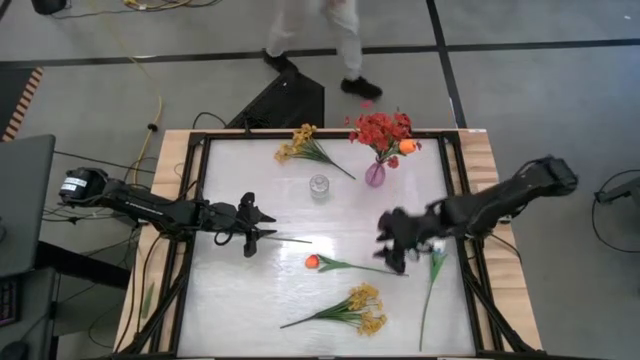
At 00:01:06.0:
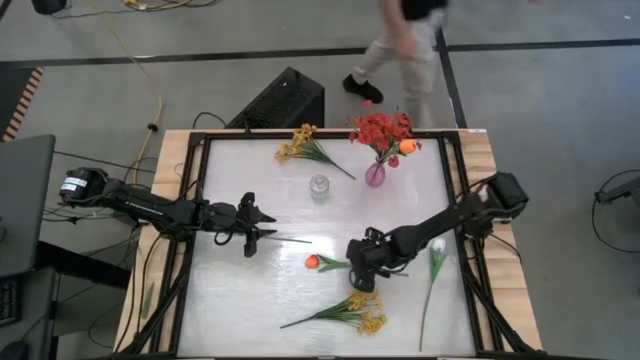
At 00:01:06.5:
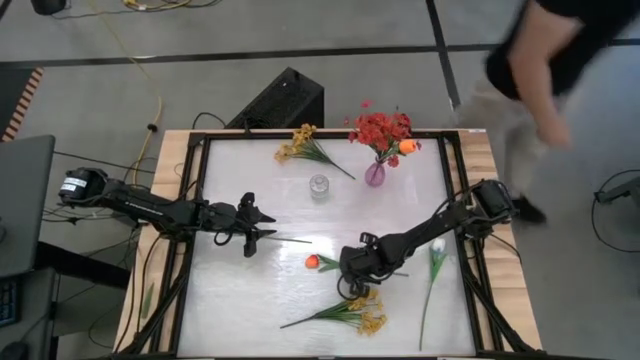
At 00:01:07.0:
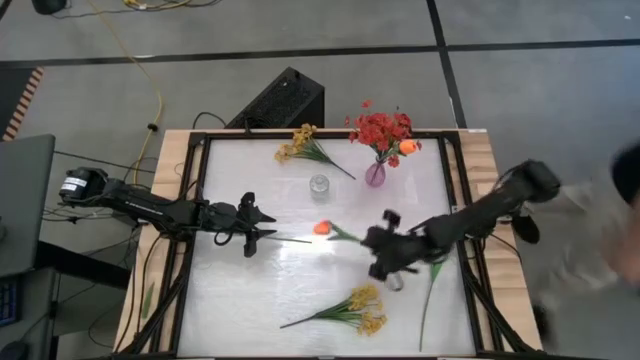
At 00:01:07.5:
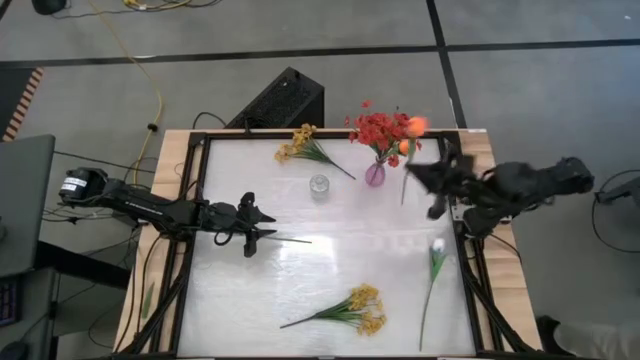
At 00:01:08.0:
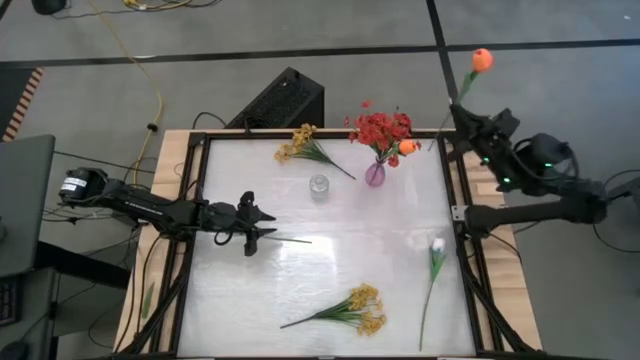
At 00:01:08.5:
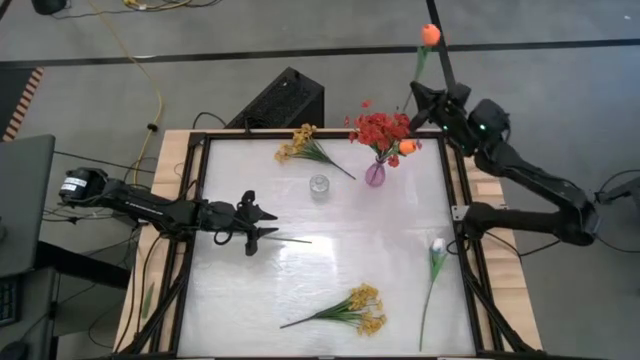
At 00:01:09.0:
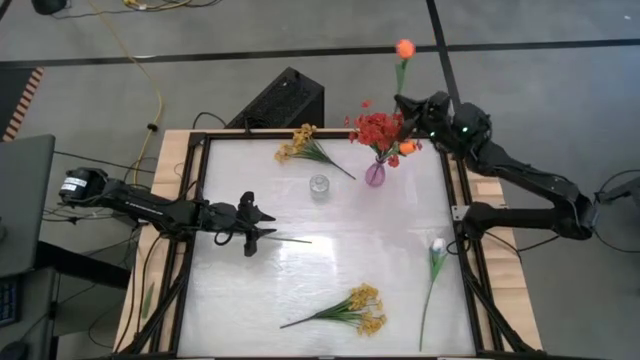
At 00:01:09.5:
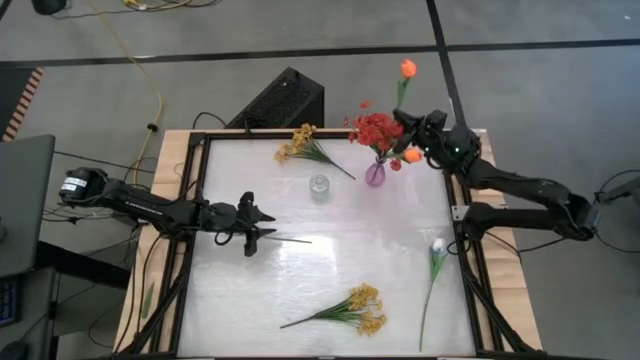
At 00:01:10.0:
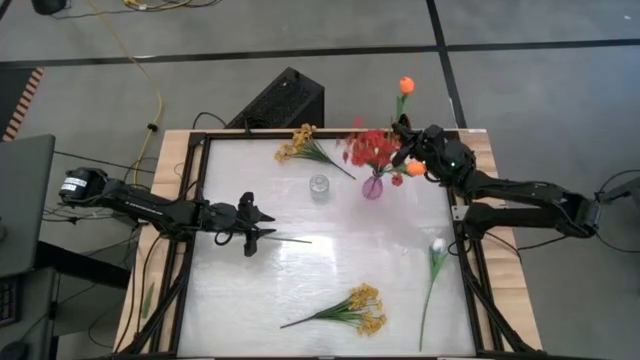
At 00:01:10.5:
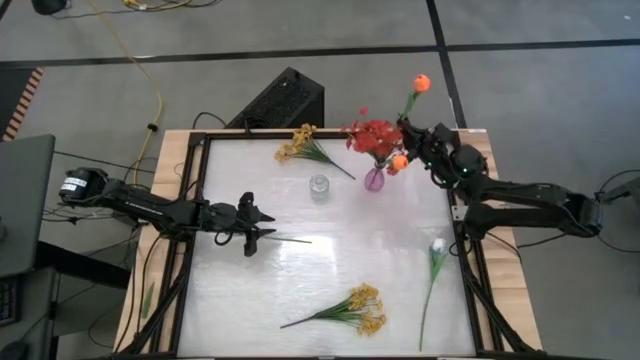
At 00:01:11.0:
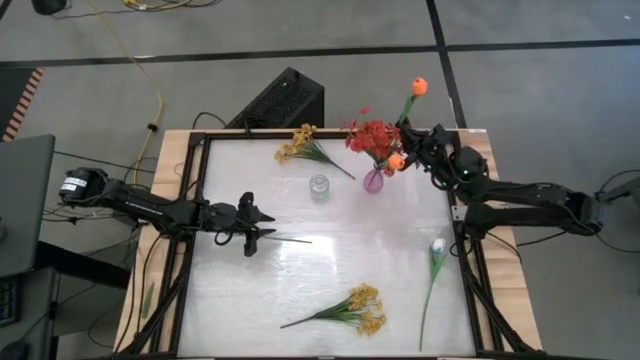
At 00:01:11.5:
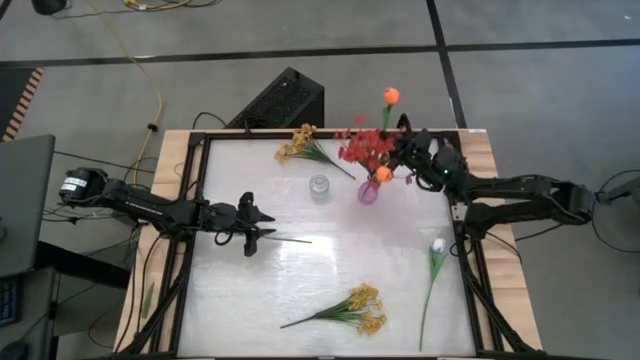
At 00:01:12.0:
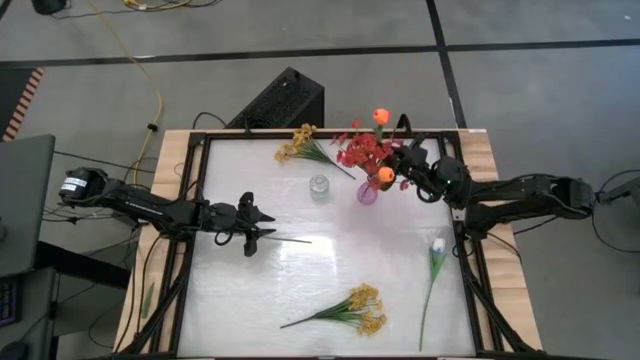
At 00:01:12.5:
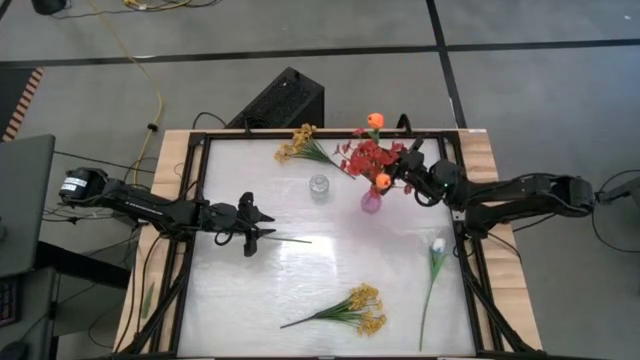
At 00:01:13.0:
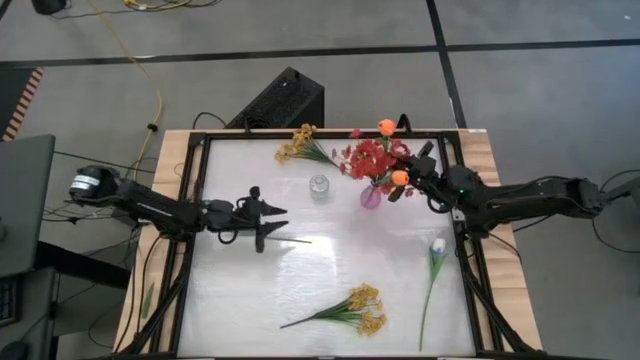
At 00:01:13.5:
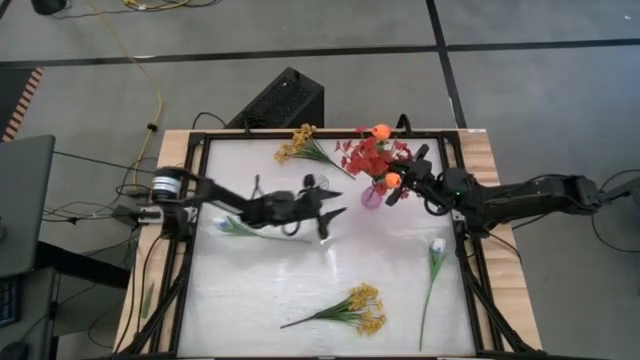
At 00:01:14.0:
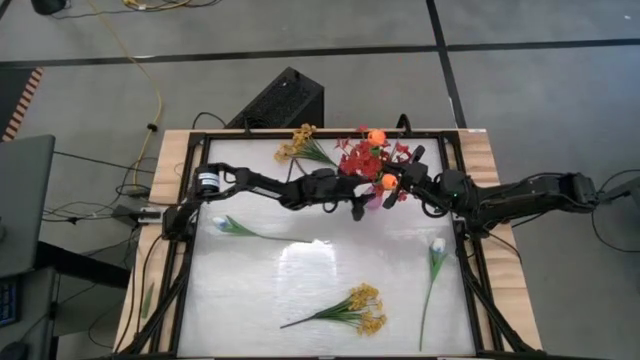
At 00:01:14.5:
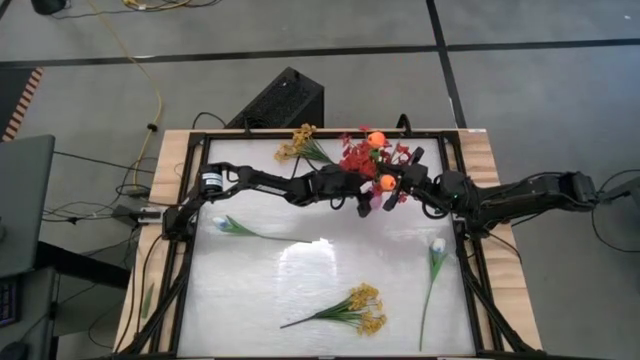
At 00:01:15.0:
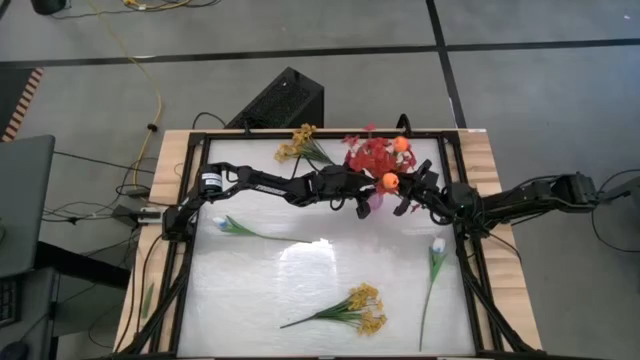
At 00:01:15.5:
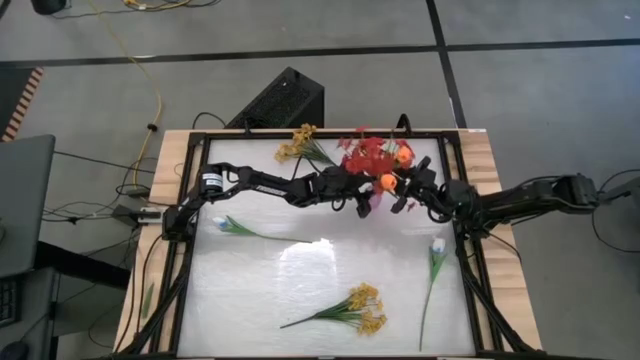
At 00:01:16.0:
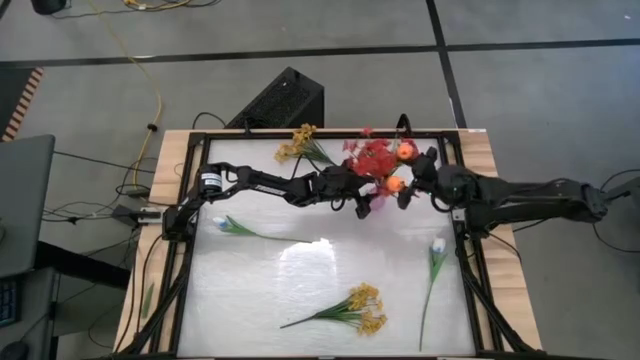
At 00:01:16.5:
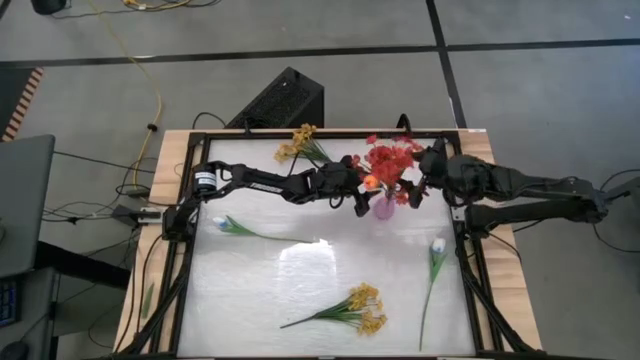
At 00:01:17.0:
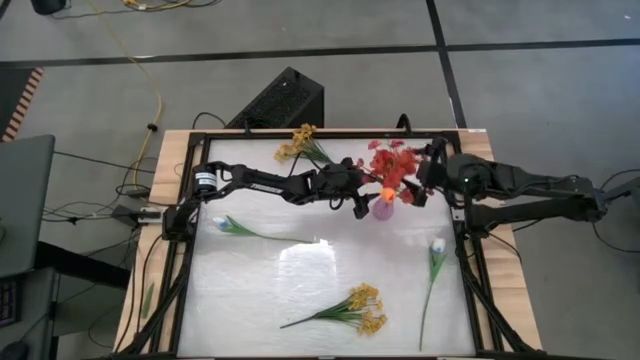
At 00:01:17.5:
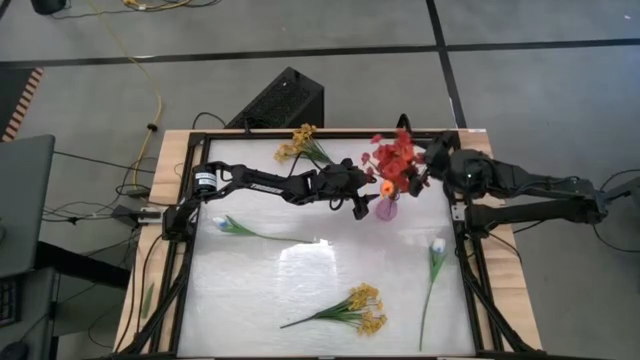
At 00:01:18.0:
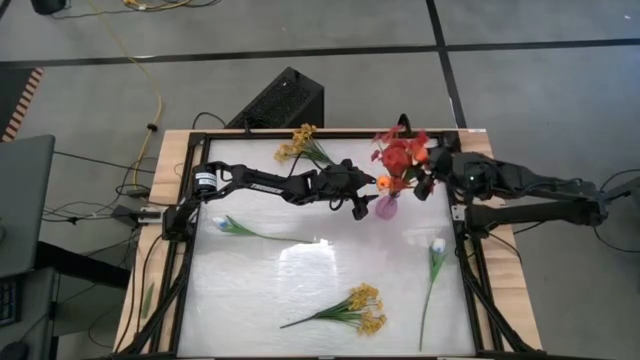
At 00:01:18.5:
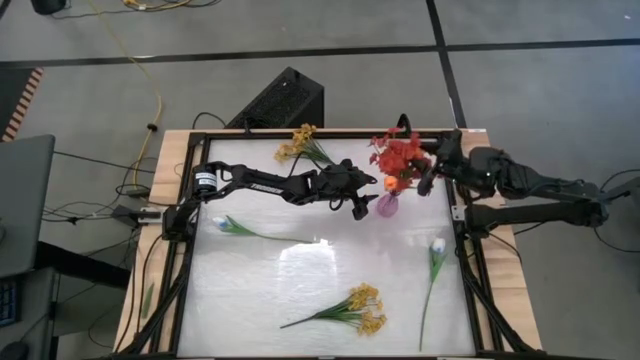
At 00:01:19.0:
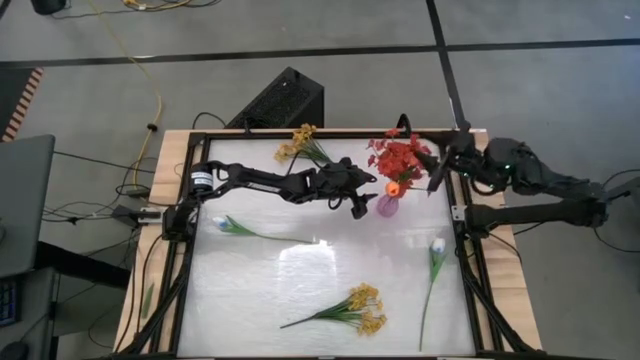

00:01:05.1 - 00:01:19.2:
Task: Sort flowers into vase by color
Put the orange flower into the pink flower vase

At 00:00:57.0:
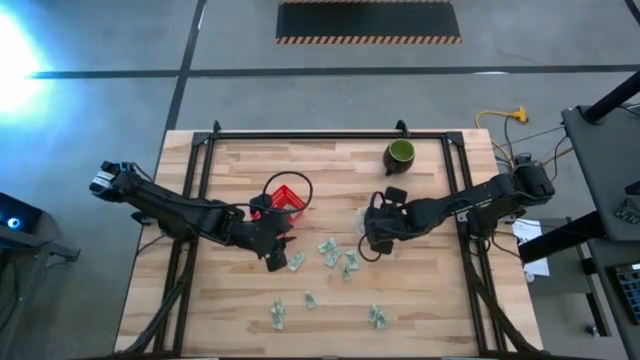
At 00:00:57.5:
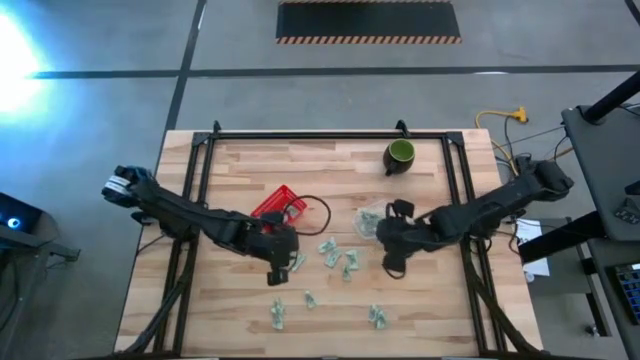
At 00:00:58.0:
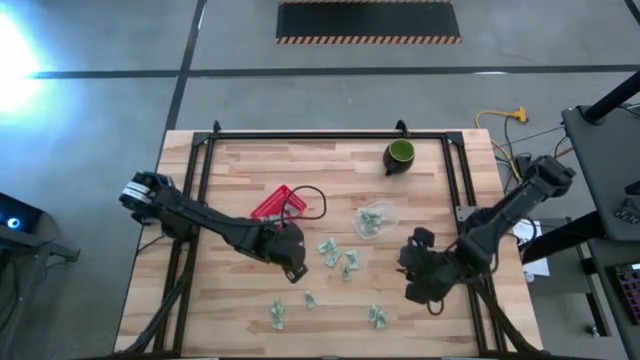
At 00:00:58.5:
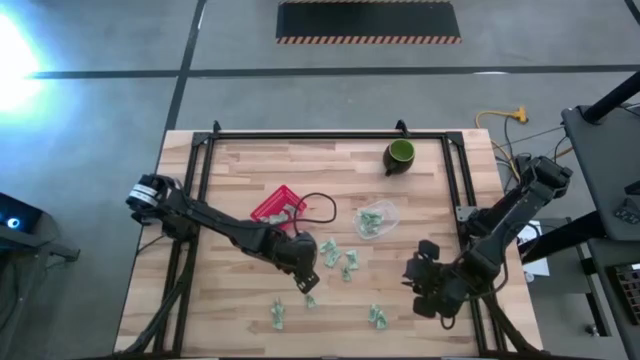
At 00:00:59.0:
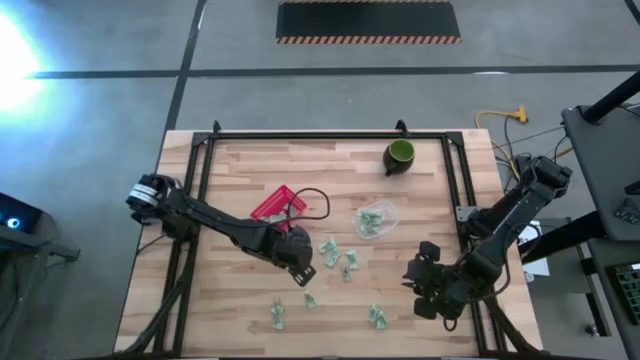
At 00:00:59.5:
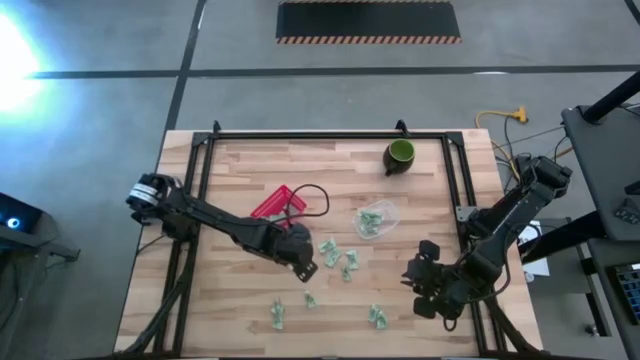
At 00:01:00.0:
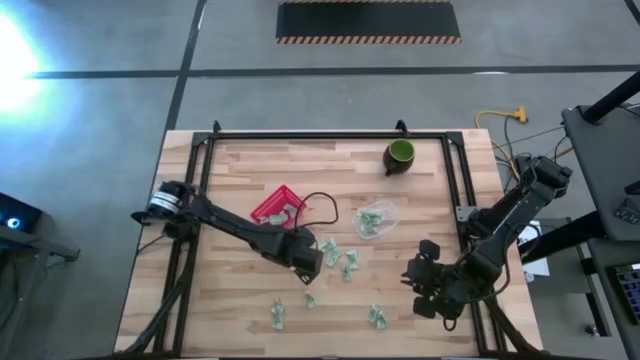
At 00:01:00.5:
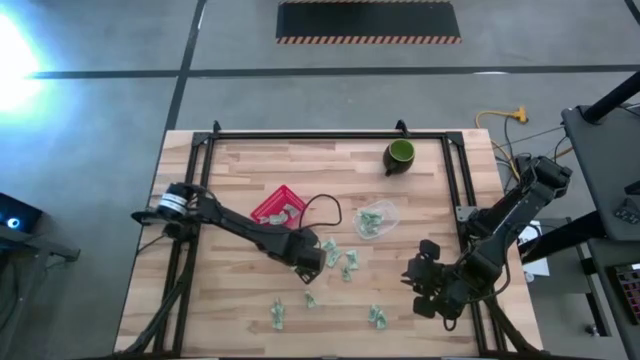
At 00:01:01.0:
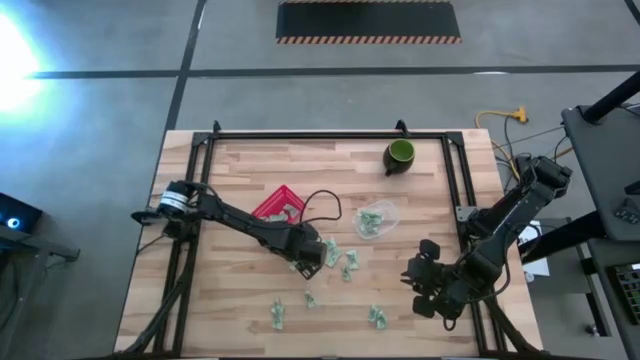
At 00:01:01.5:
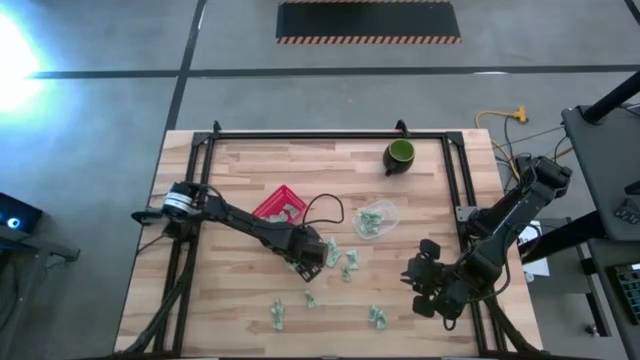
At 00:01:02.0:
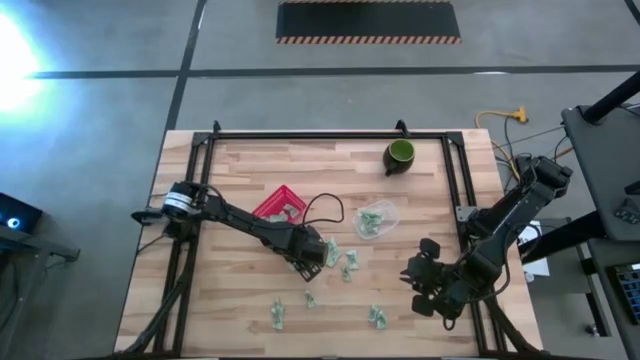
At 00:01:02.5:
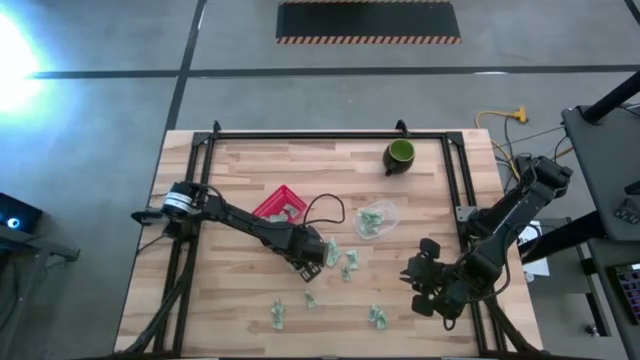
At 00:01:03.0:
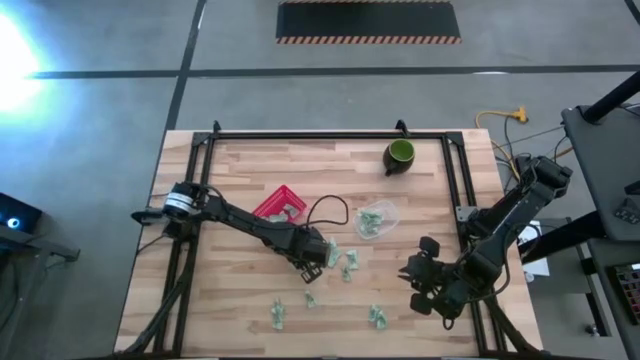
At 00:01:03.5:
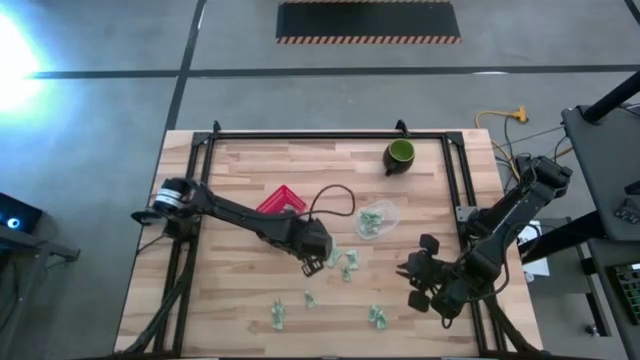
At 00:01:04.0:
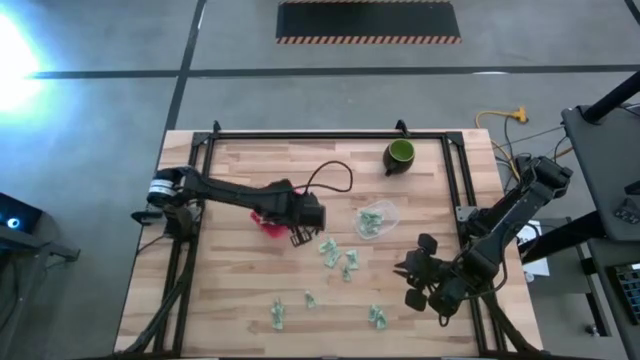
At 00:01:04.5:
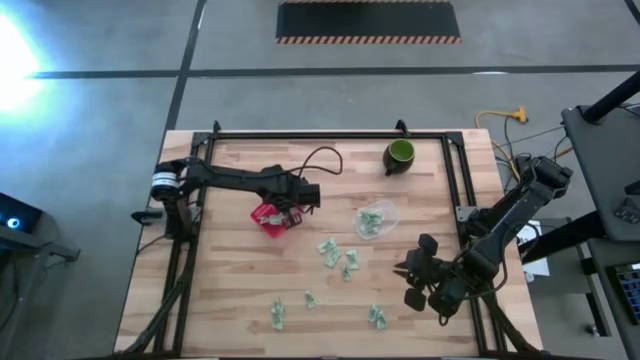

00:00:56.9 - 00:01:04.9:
Task: Pick and place items into bin
Put the stevia packet into the red bin
